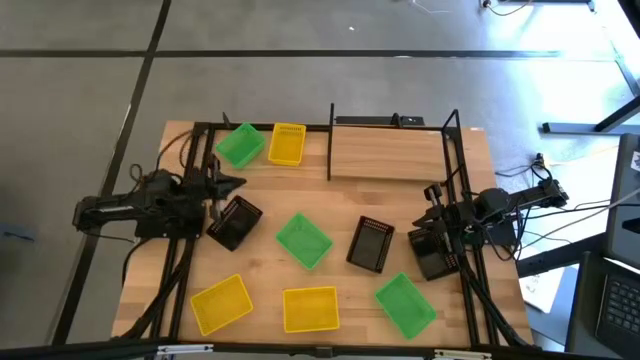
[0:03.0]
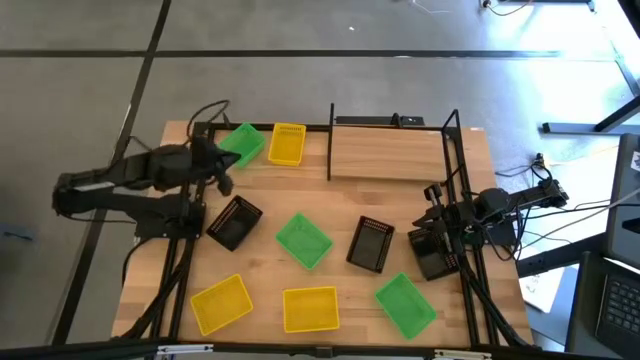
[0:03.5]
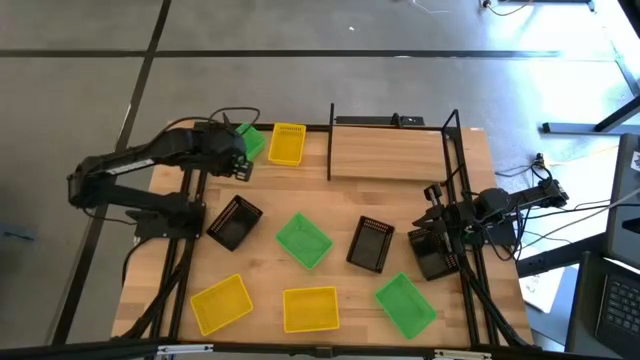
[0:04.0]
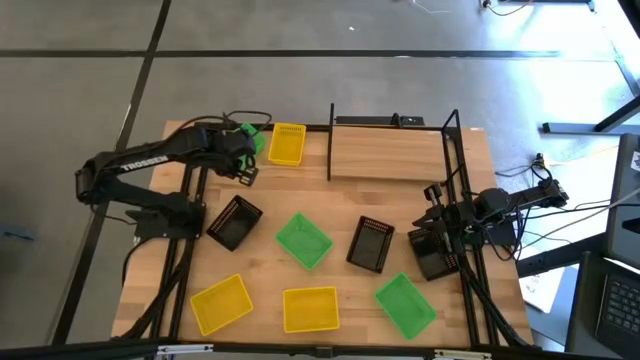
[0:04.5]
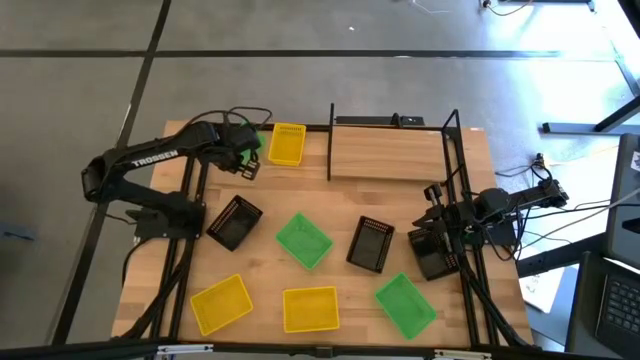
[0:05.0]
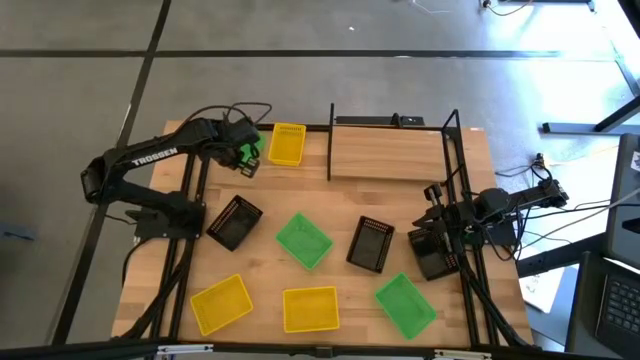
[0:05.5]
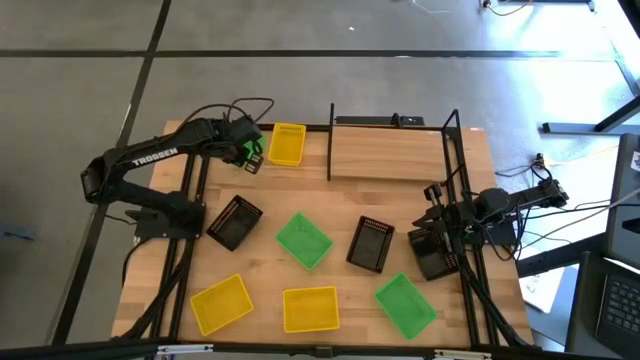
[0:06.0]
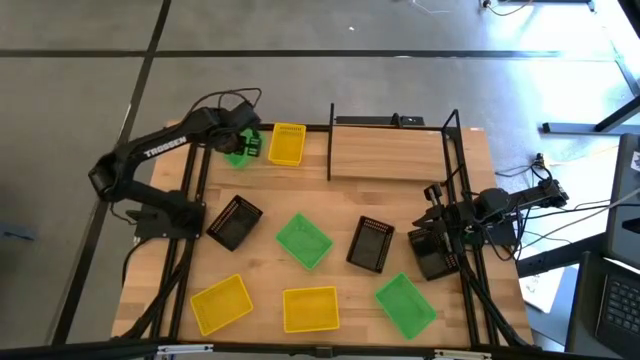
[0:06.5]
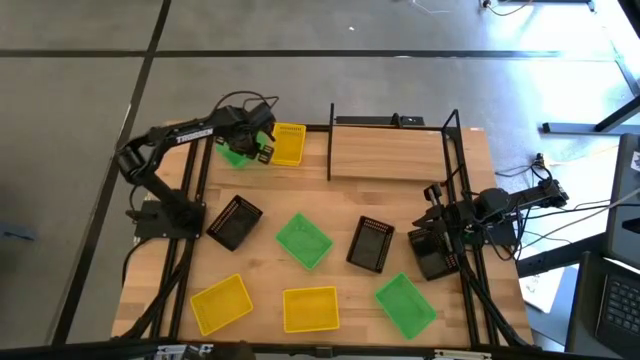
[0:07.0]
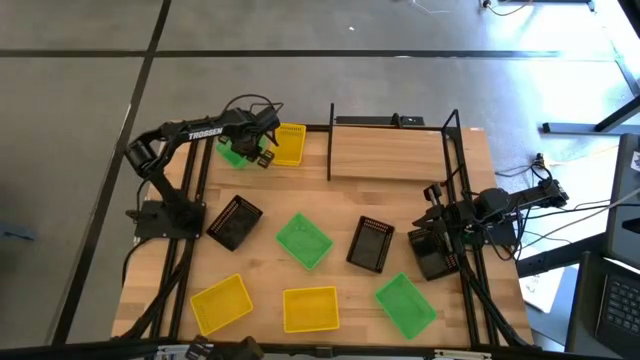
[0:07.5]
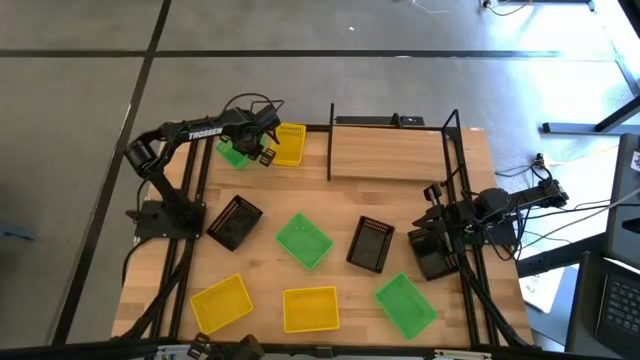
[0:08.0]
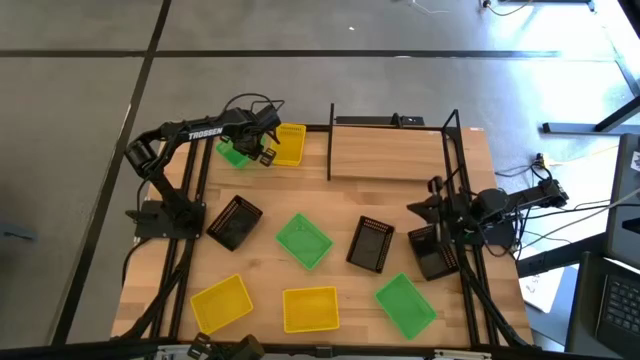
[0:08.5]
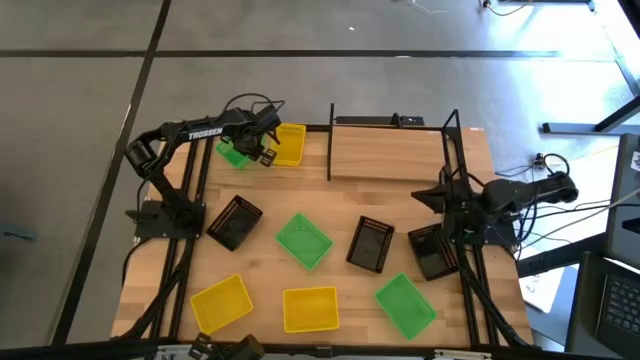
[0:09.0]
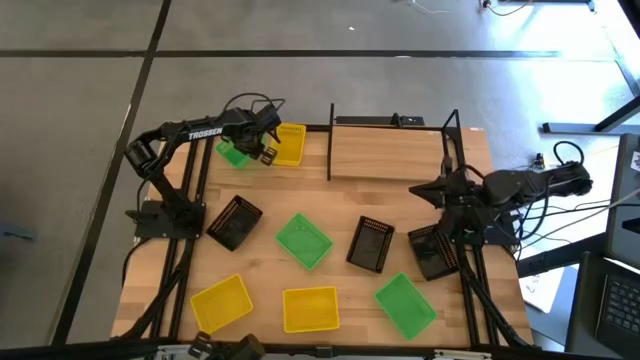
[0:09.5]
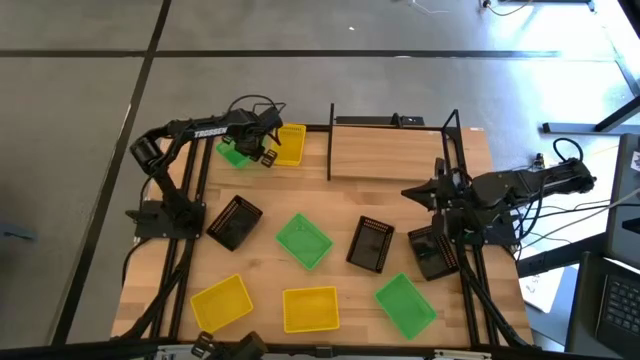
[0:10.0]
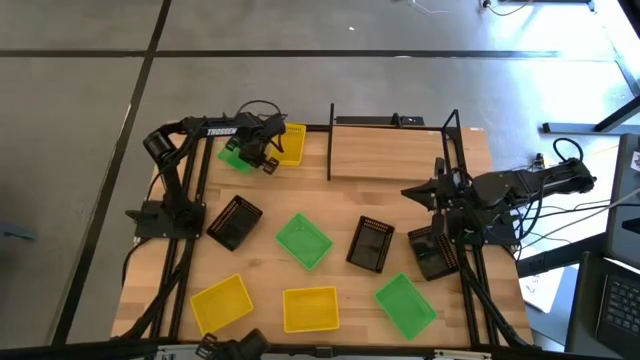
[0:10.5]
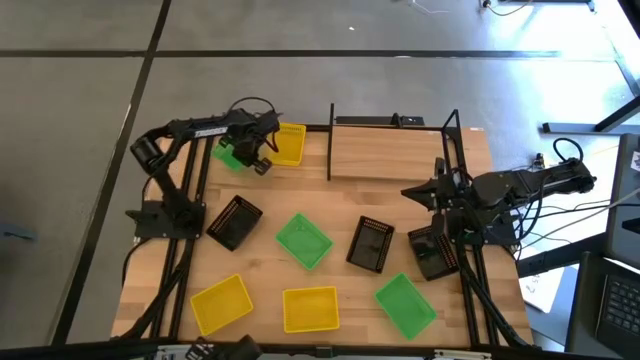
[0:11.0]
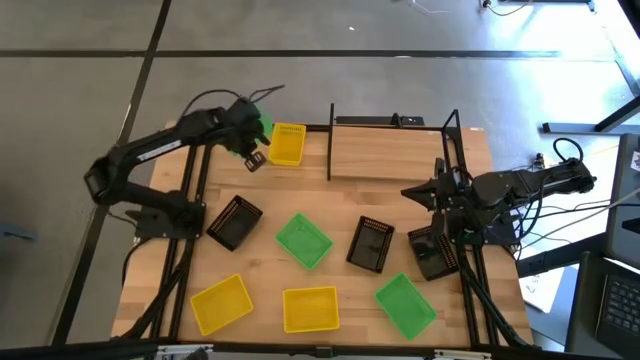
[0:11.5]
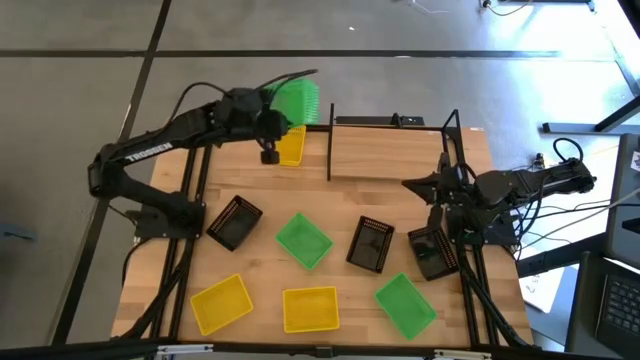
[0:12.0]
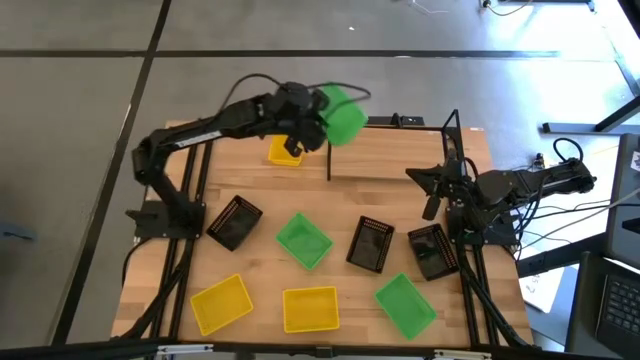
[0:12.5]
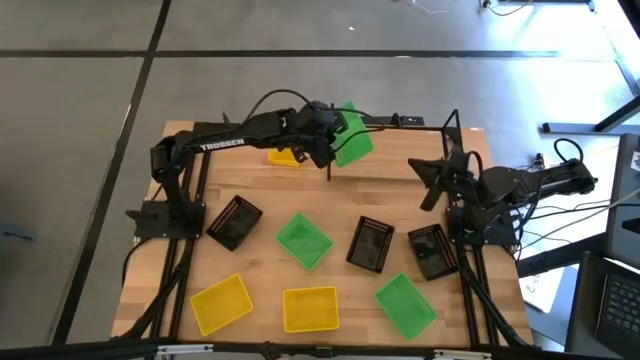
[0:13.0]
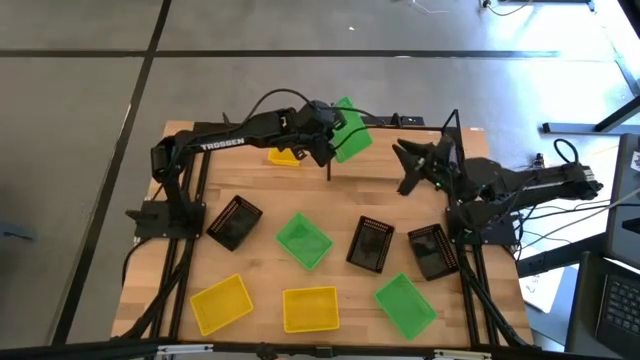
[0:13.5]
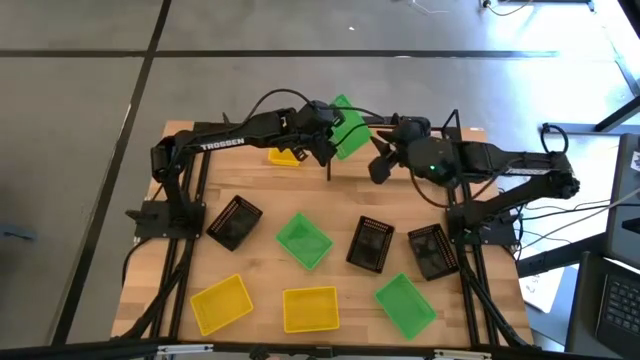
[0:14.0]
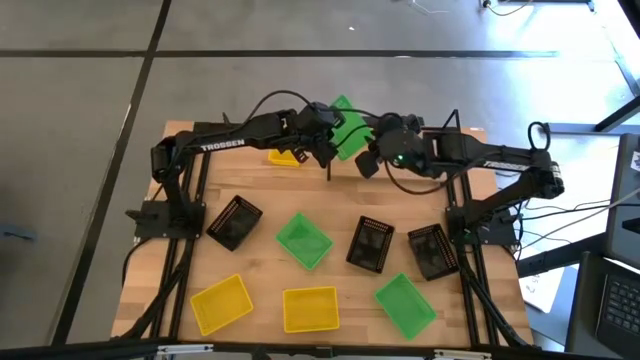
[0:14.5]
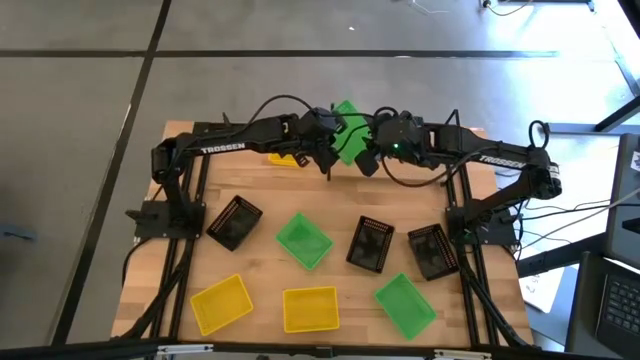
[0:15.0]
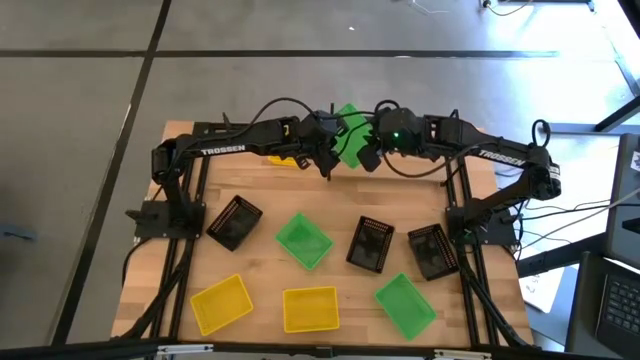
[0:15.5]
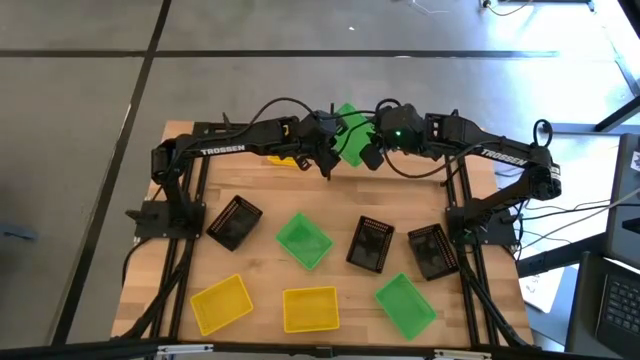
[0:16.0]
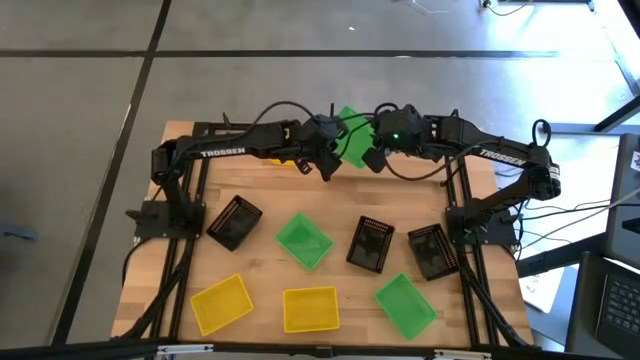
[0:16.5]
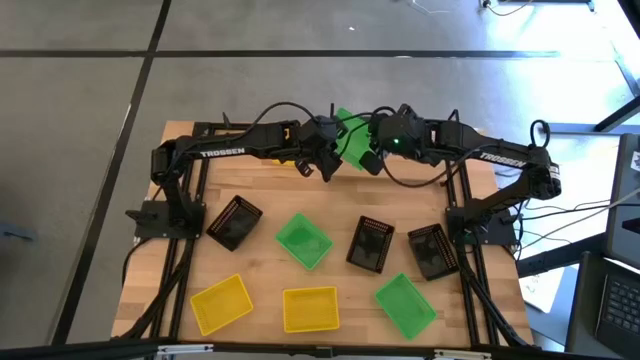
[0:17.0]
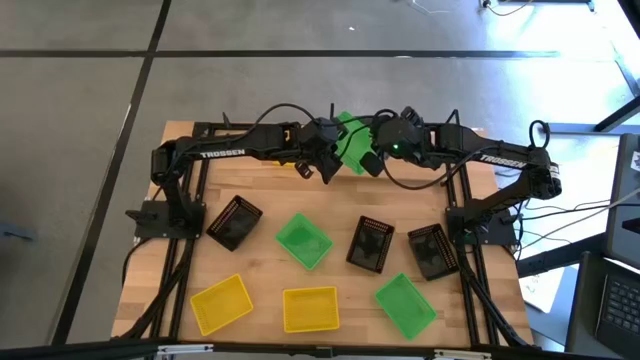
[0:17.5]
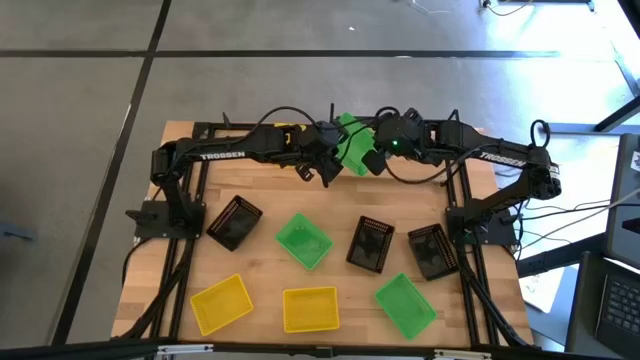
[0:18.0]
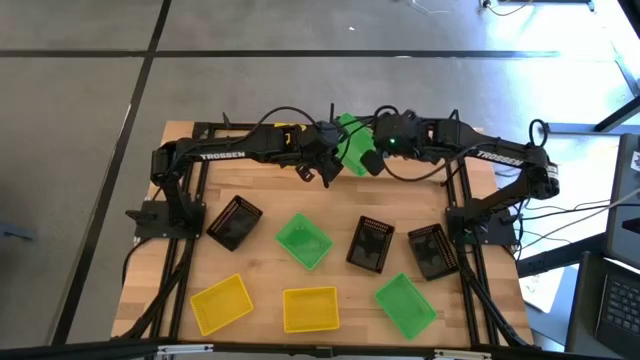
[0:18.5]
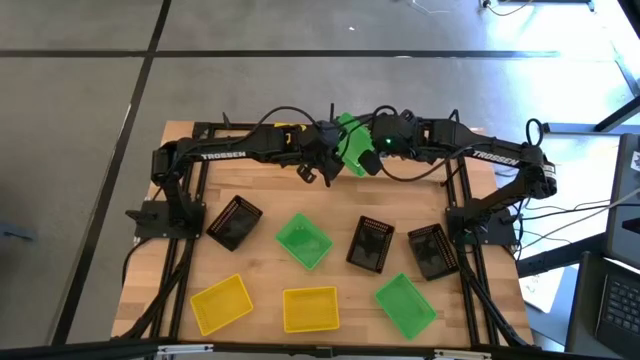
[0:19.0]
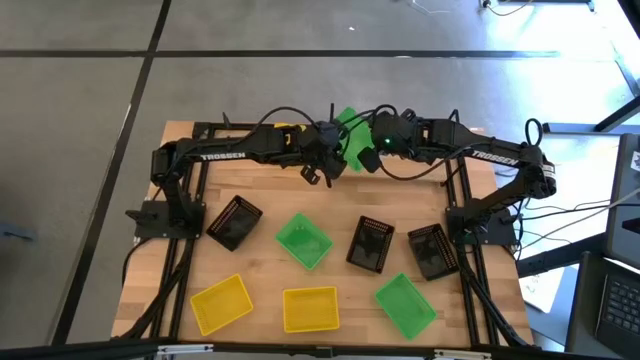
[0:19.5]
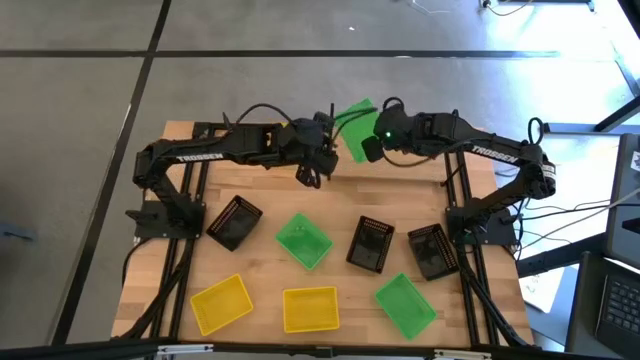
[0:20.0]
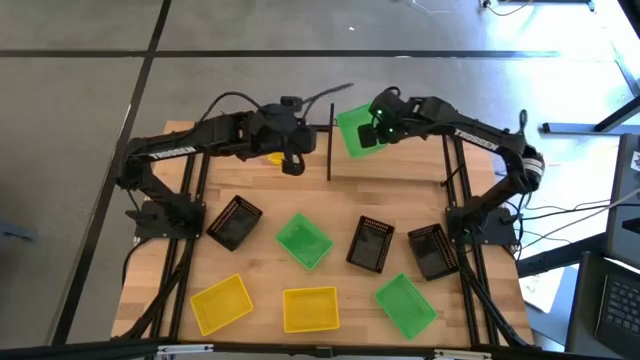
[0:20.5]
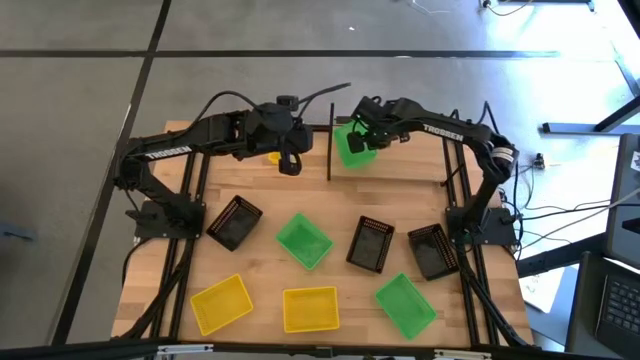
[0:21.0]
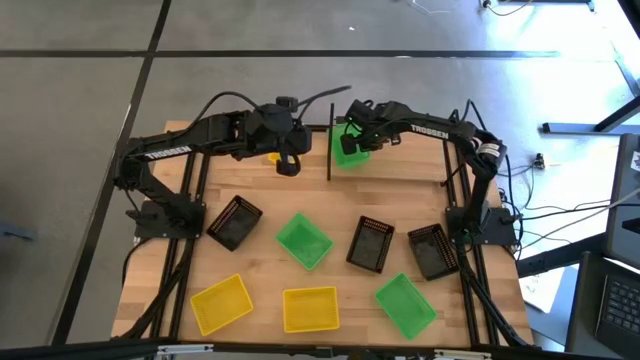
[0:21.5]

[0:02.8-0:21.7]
Task: Stack baskets on shelf by color
Put the top green bin onto the shelf
